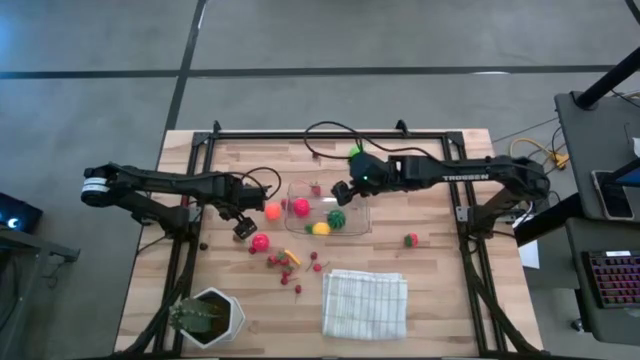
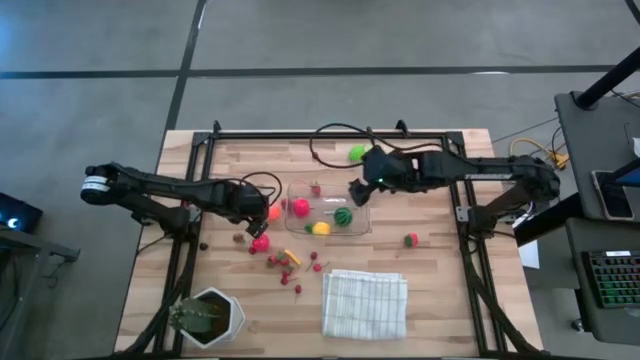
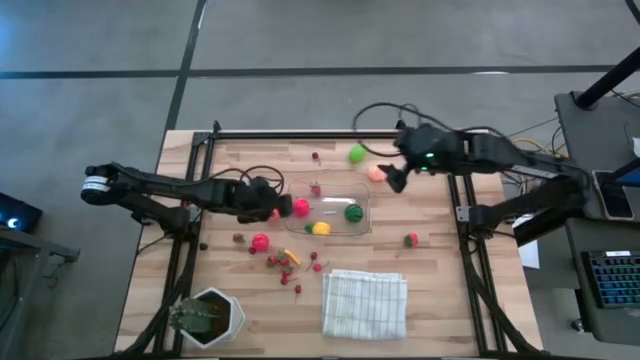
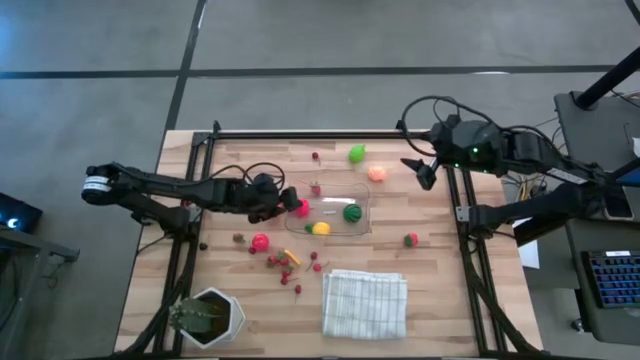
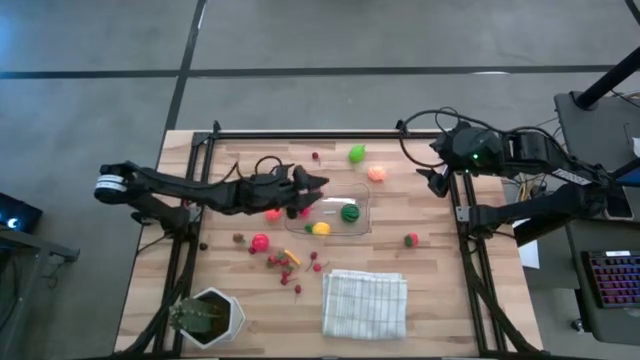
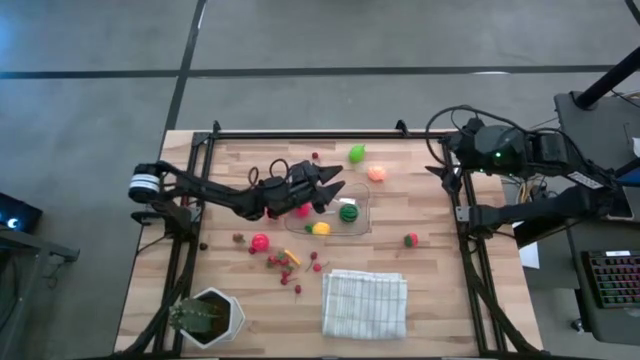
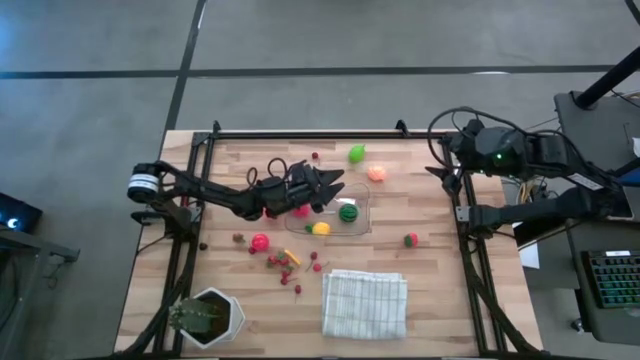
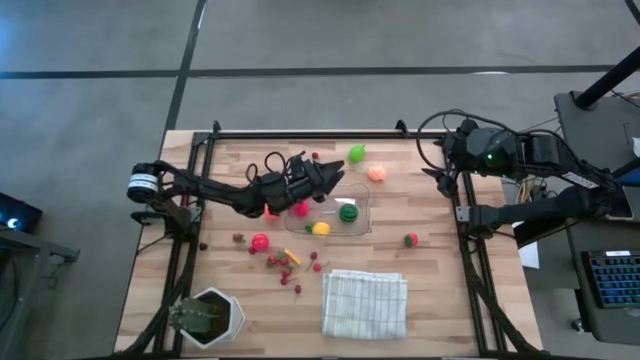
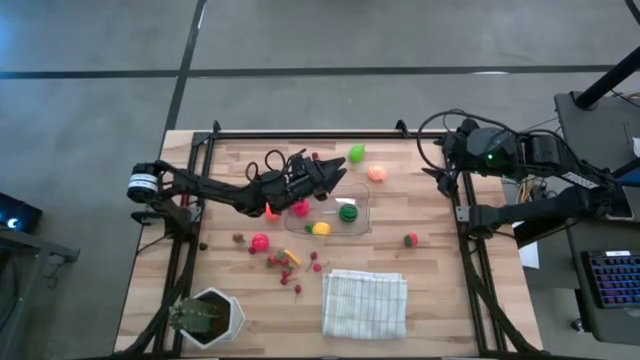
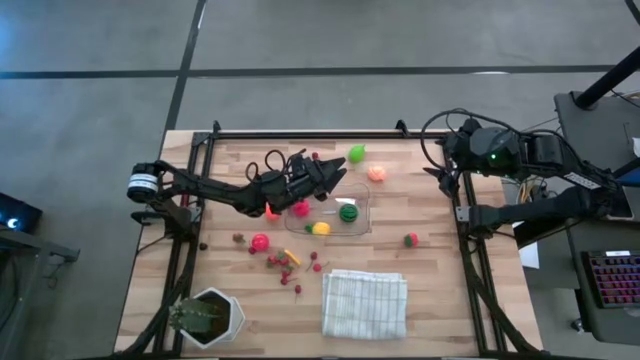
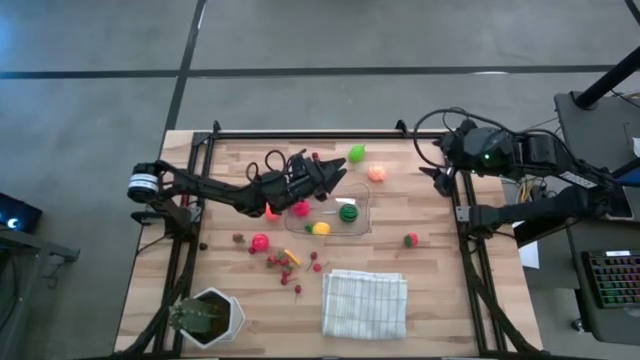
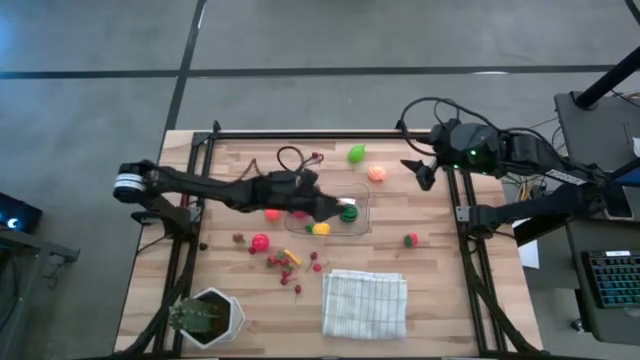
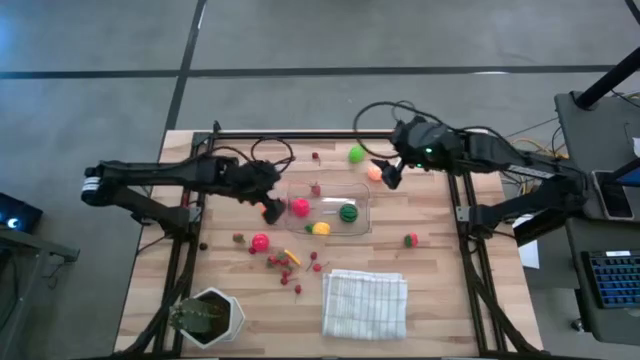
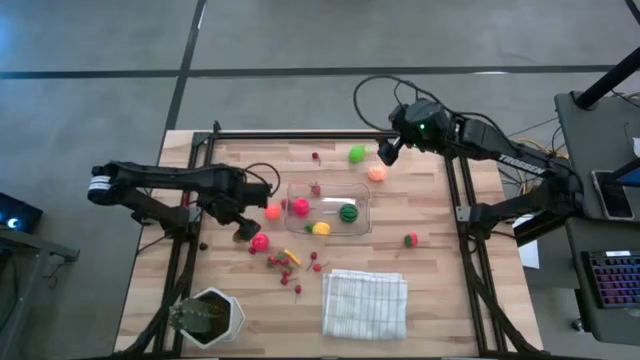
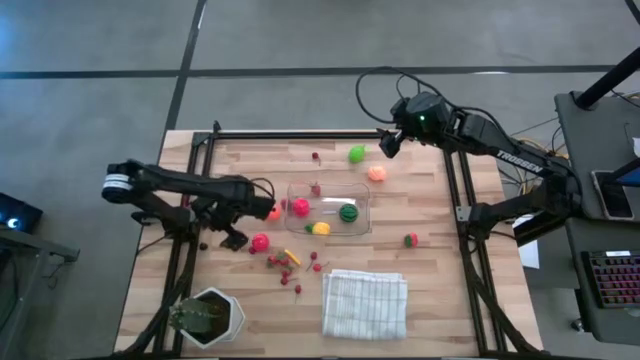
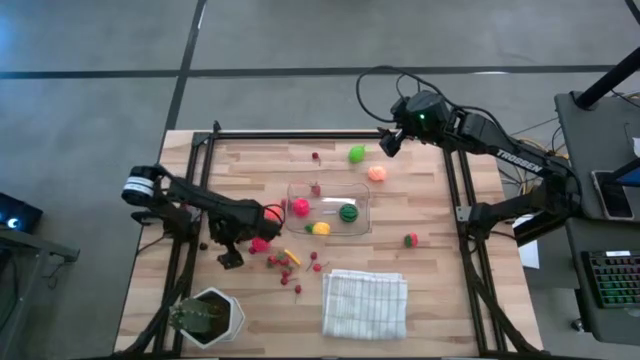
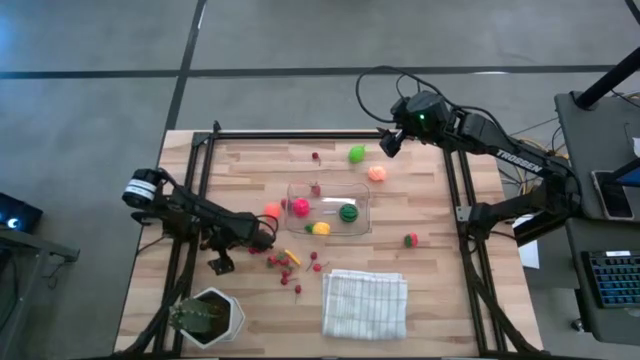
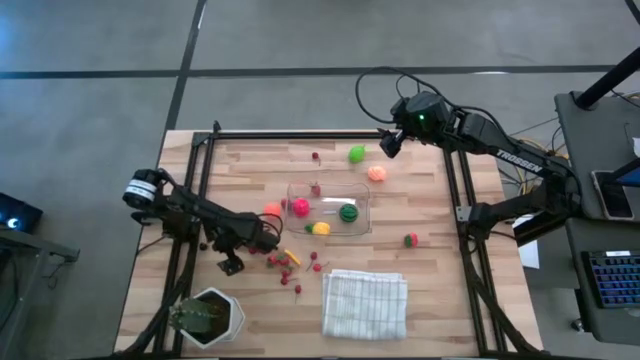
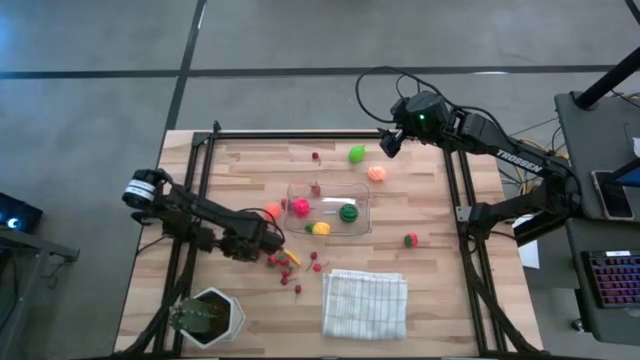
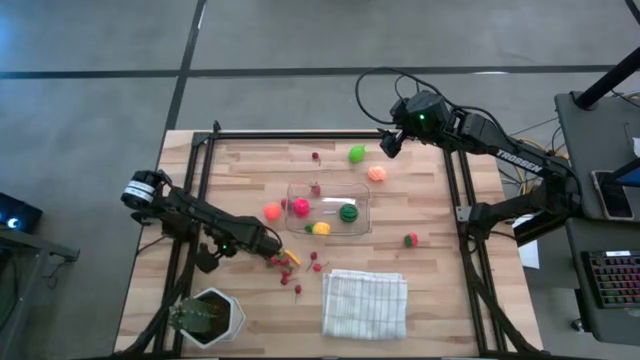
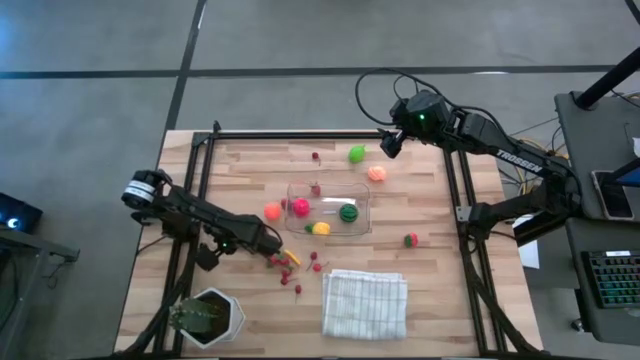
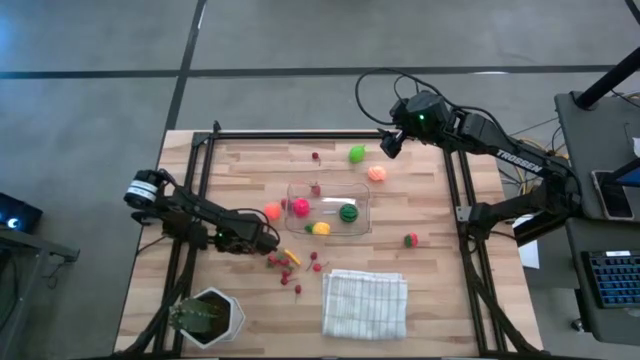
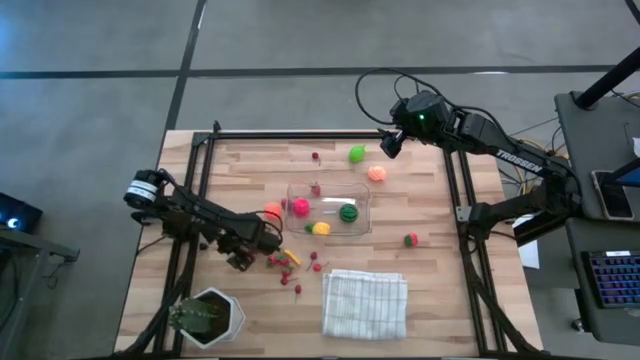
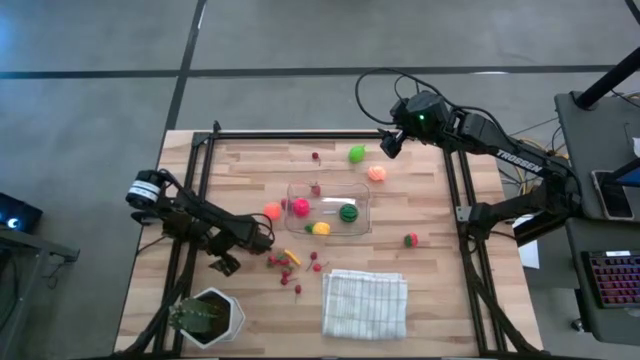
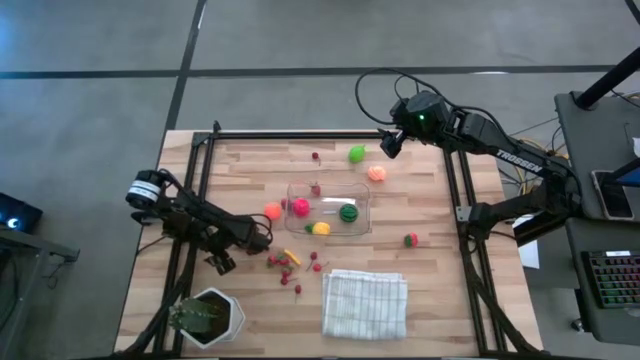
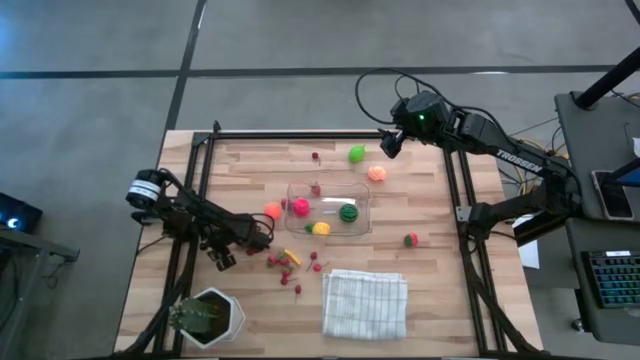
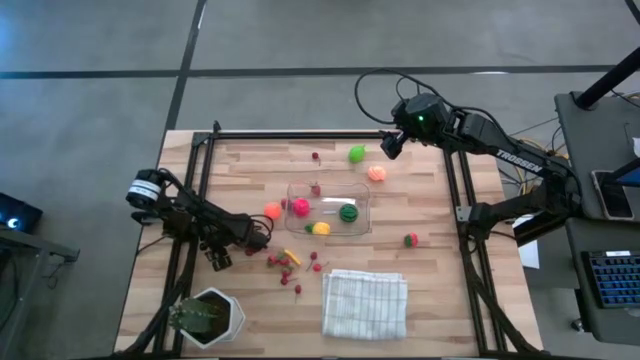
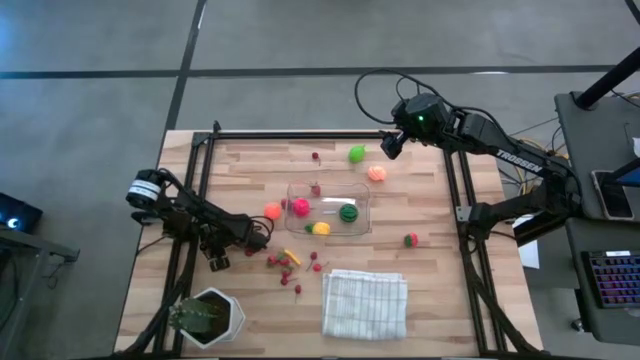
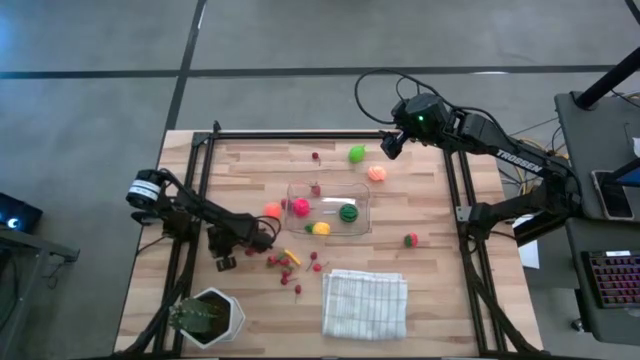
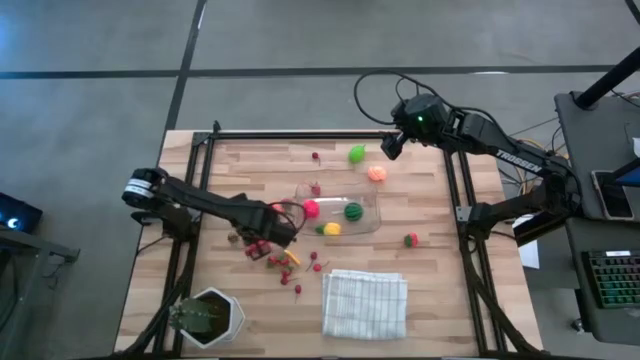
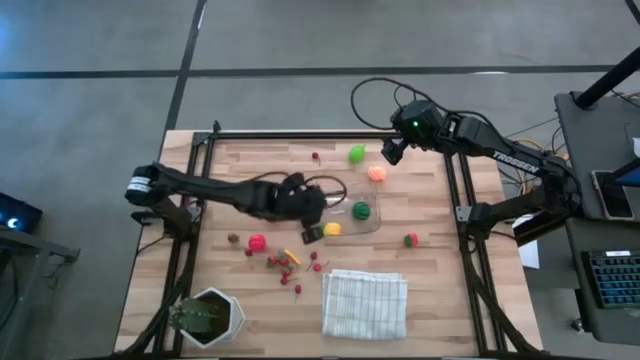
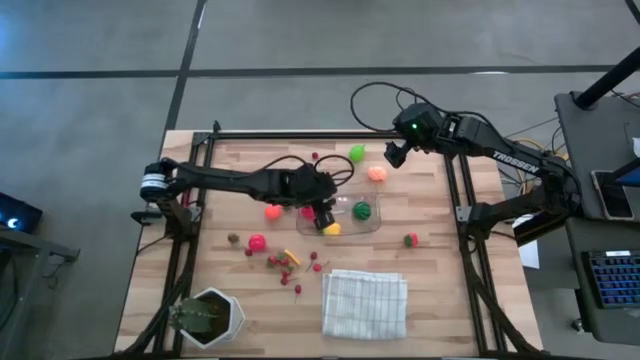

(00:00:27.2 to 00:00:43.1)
Task: Pick and placing Produce into tupperware
Put the black cherry into the transparent bin

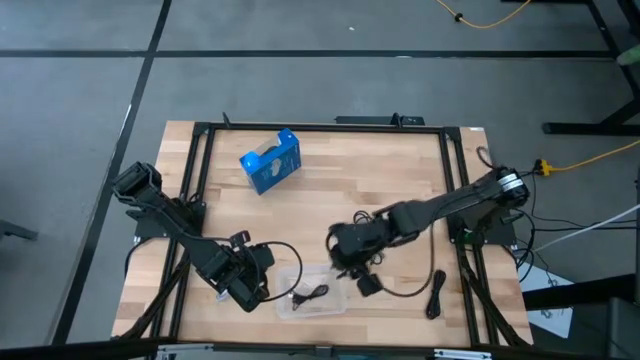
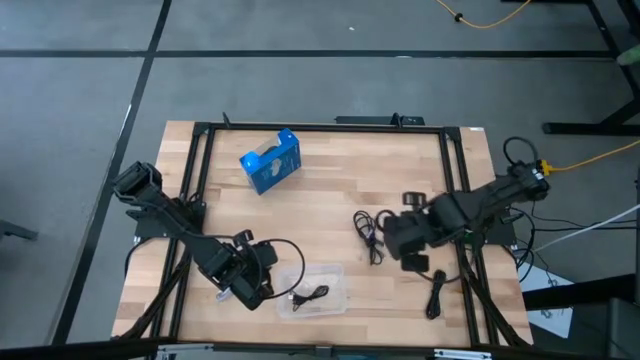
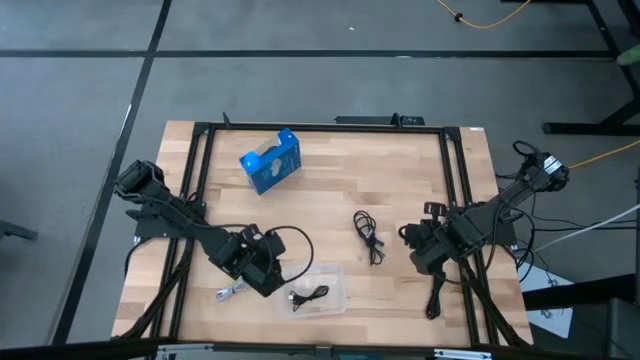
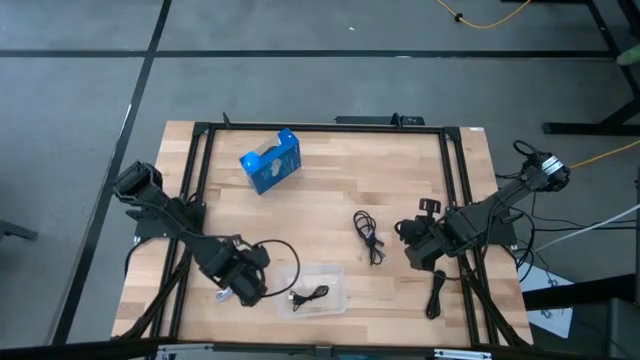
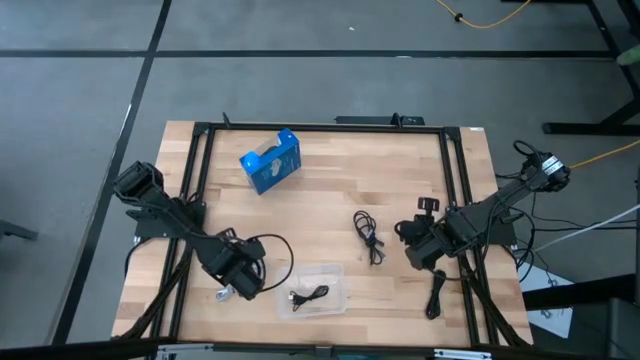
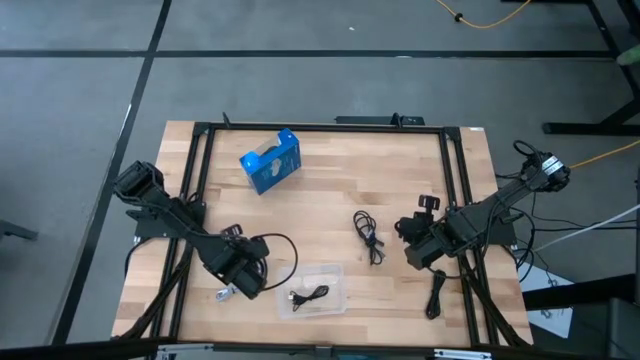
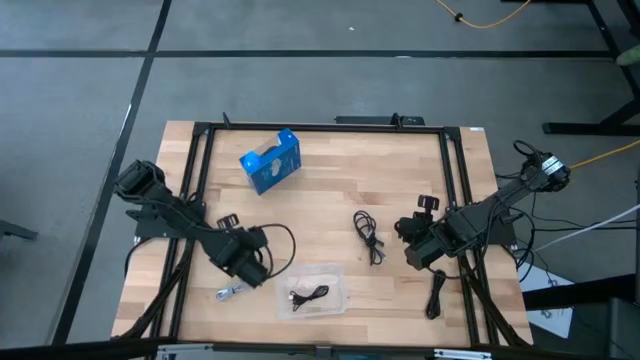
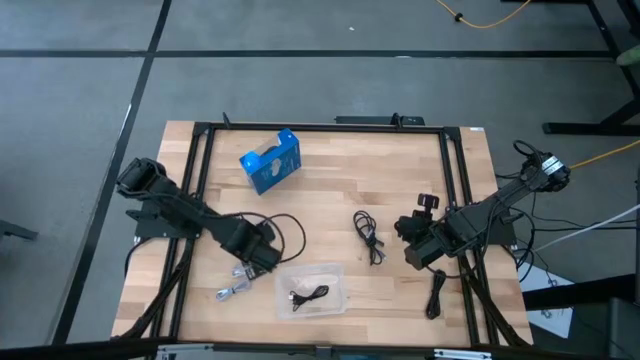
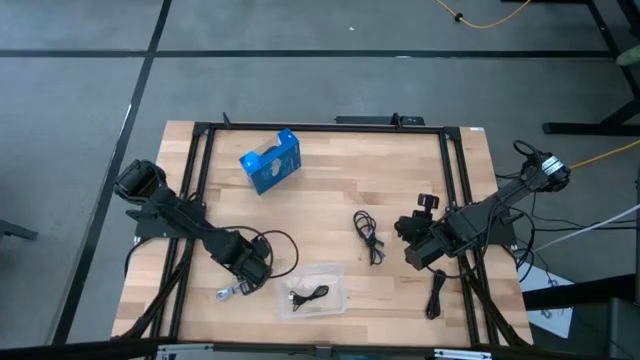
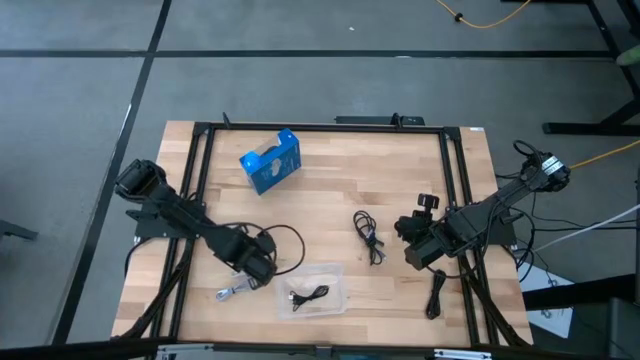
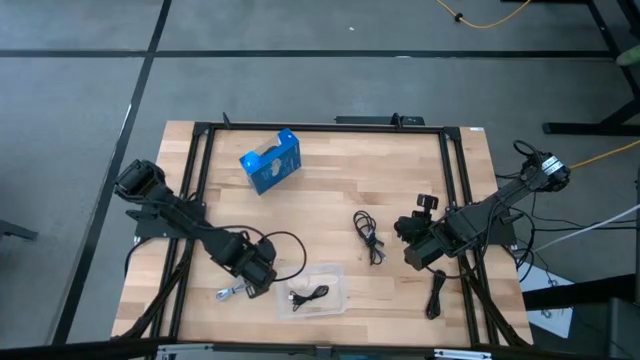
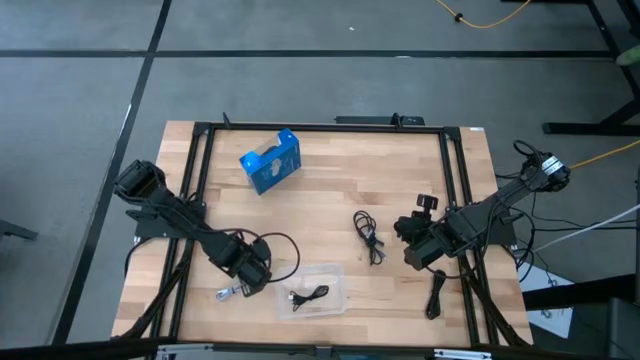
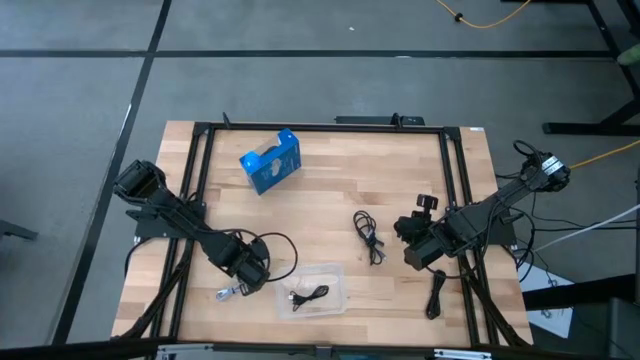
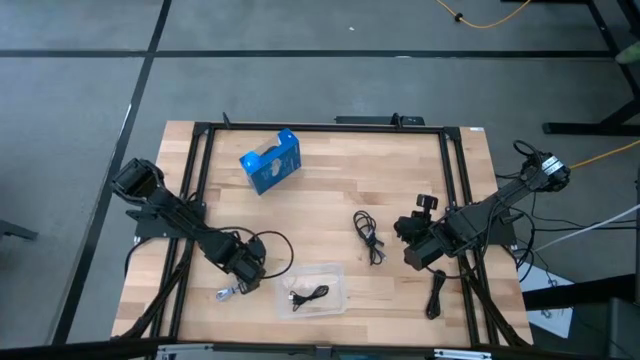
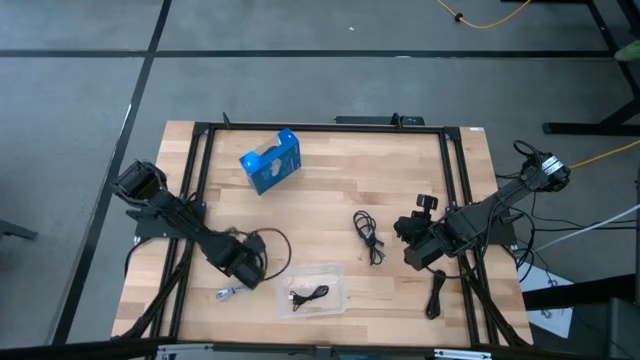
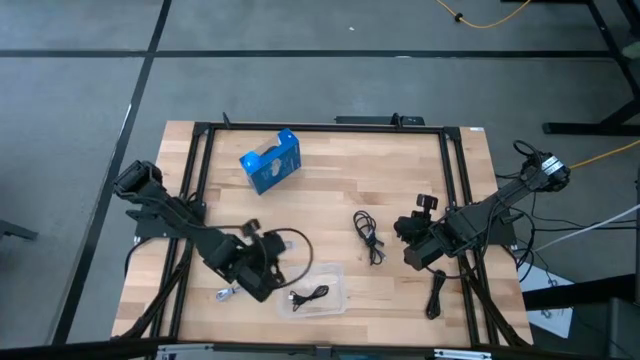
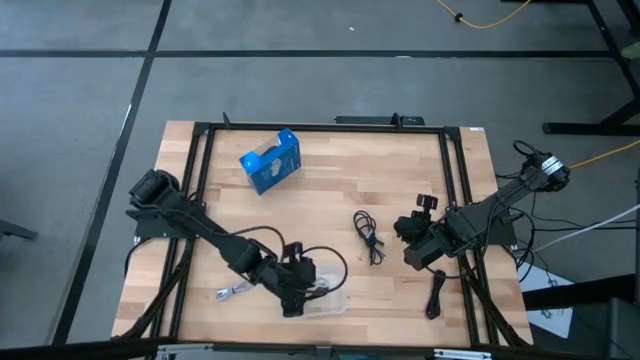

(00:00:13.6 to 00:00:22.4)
Task: Pick and place USB-C Cables
Put the white charger cable into the transparent bin
